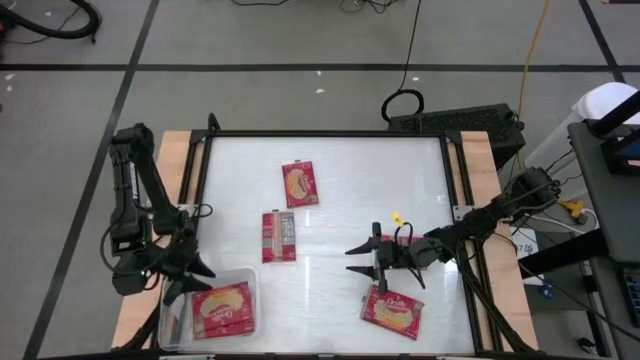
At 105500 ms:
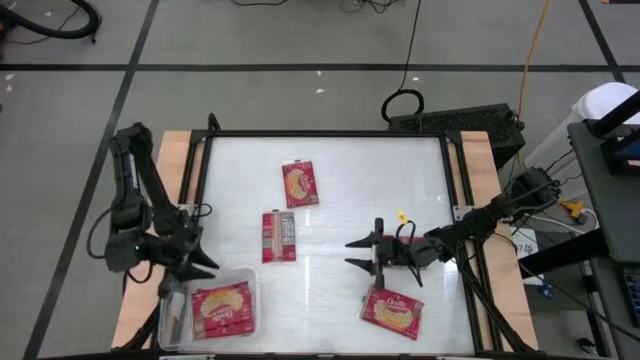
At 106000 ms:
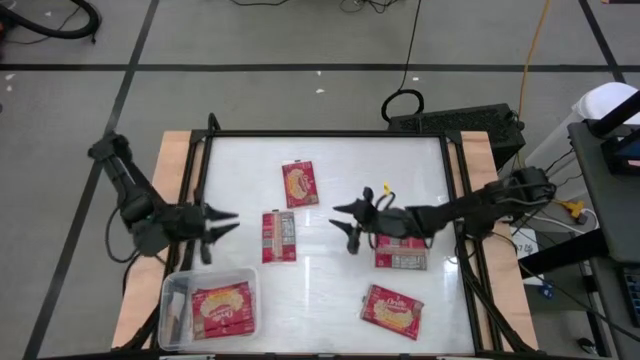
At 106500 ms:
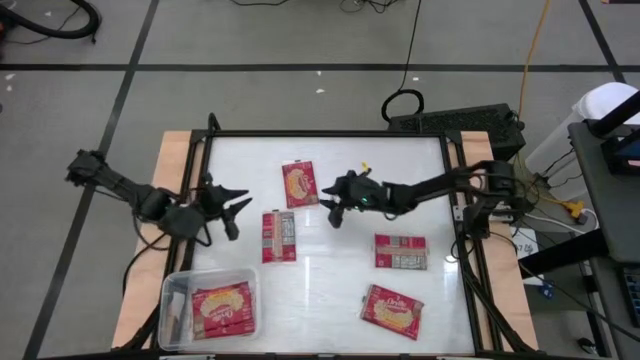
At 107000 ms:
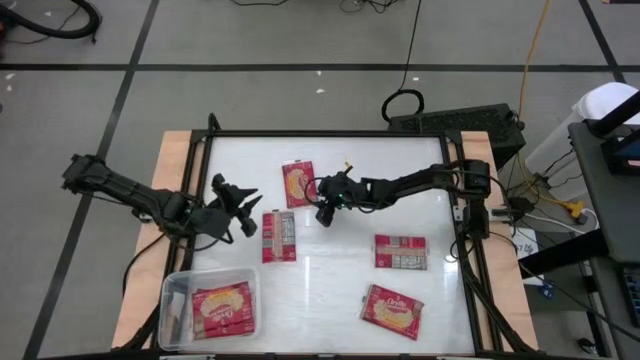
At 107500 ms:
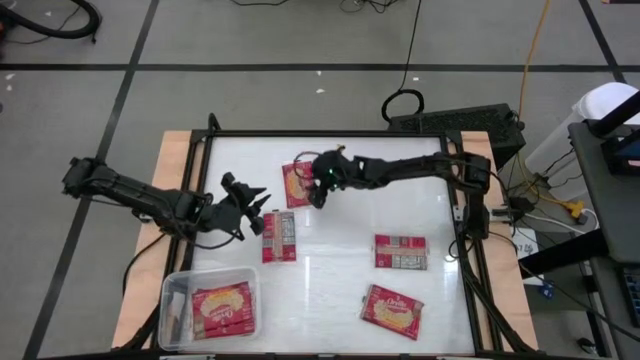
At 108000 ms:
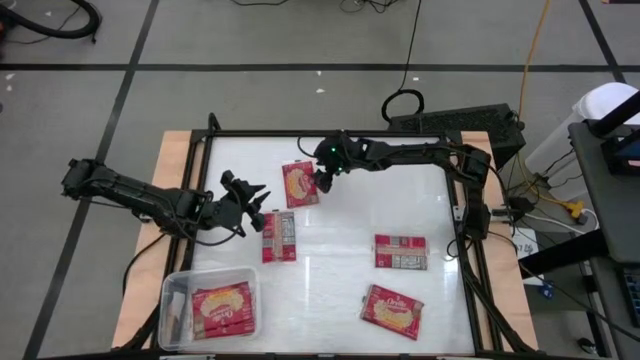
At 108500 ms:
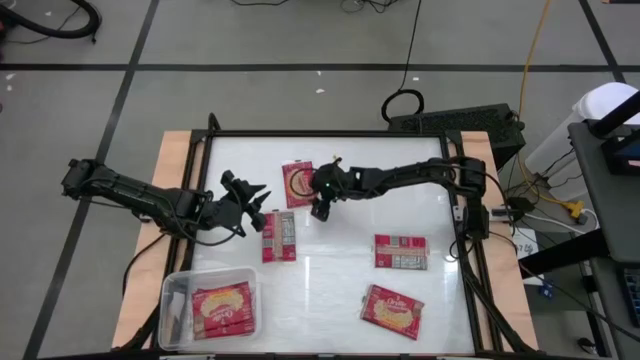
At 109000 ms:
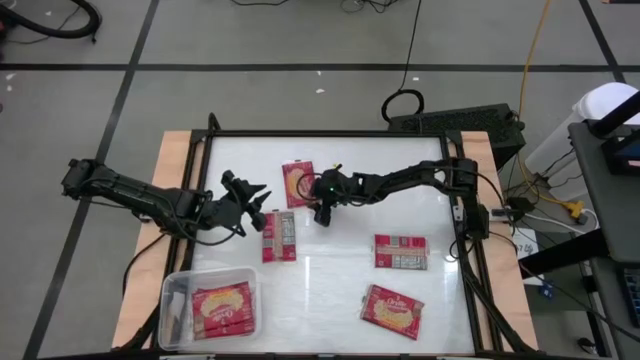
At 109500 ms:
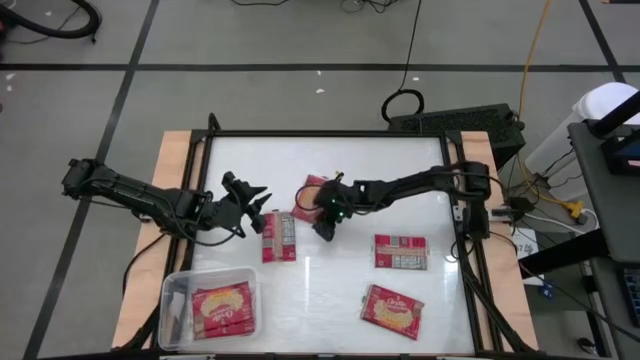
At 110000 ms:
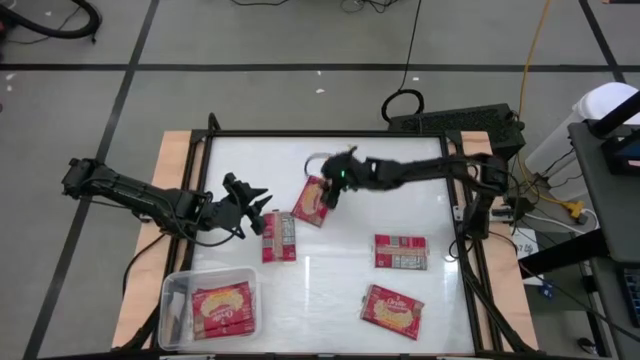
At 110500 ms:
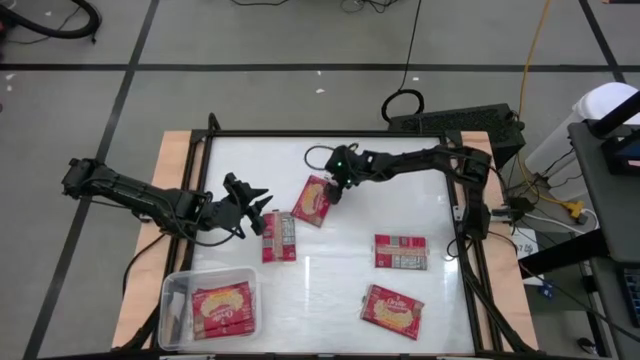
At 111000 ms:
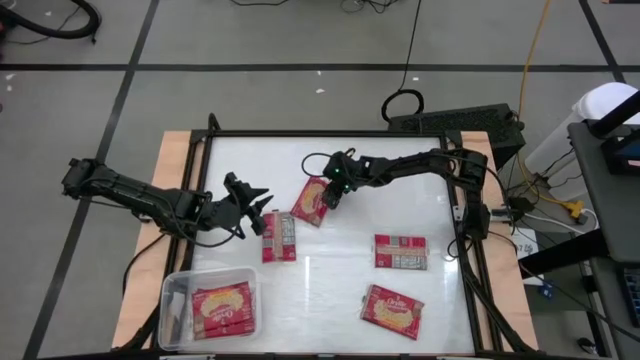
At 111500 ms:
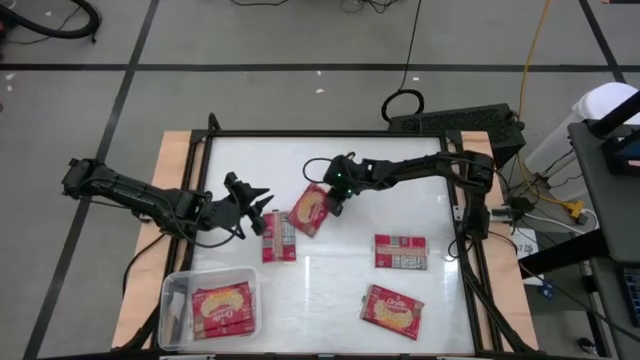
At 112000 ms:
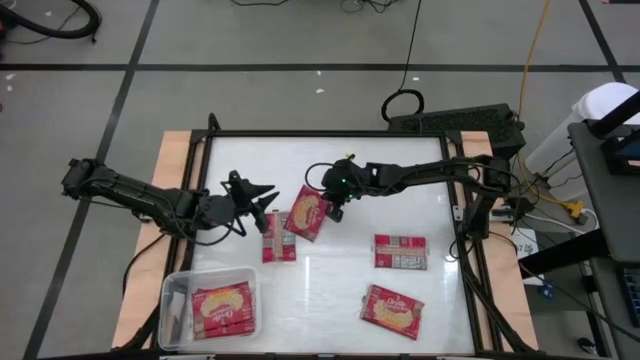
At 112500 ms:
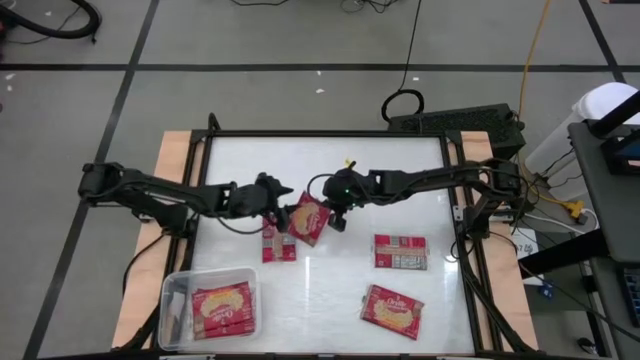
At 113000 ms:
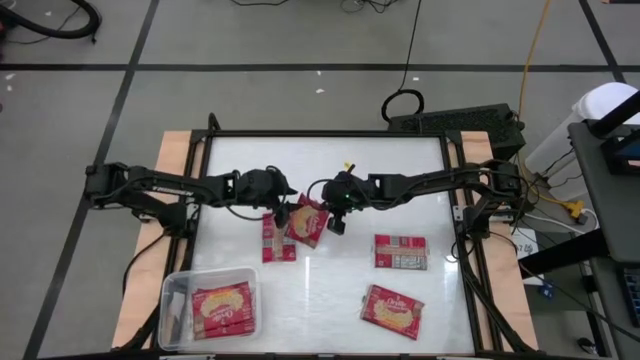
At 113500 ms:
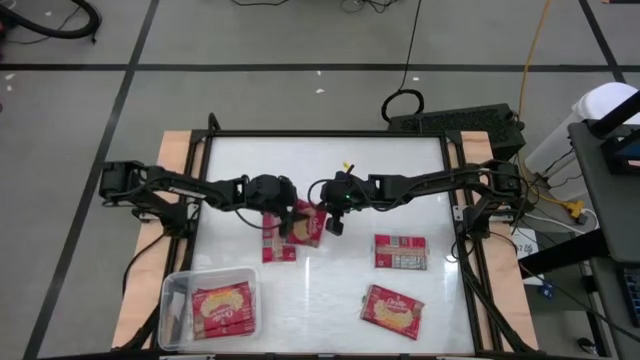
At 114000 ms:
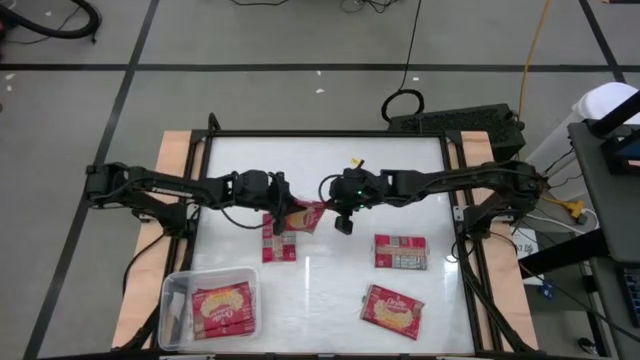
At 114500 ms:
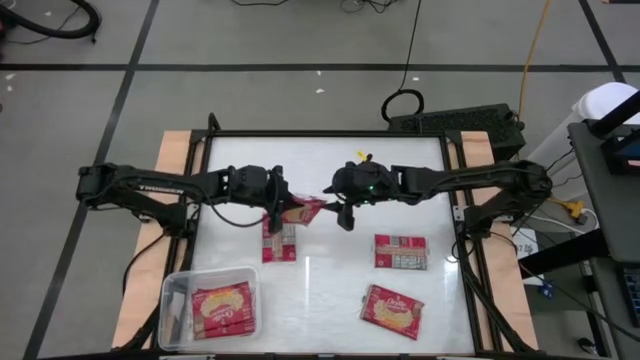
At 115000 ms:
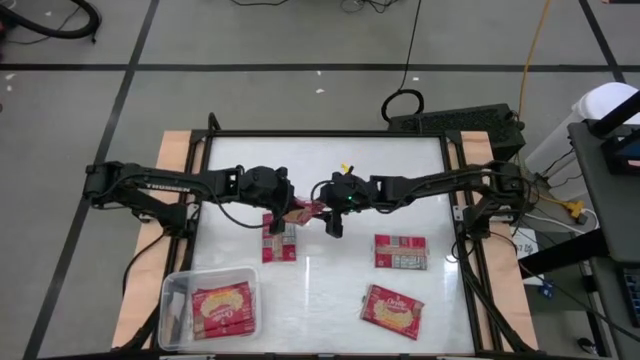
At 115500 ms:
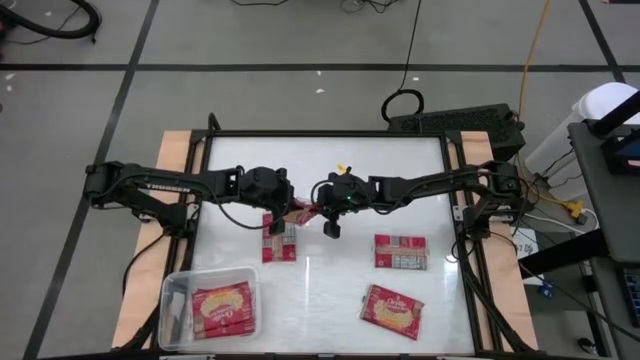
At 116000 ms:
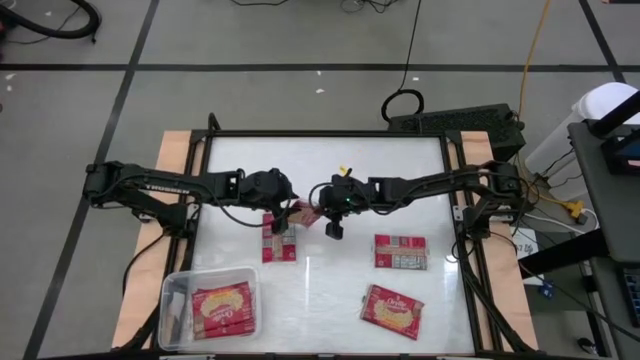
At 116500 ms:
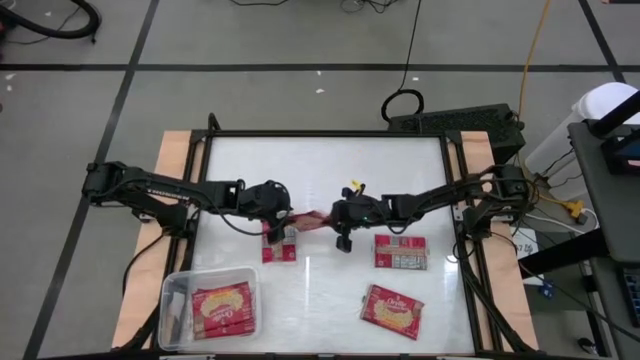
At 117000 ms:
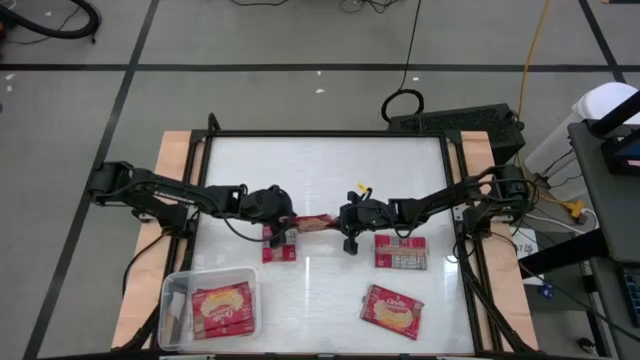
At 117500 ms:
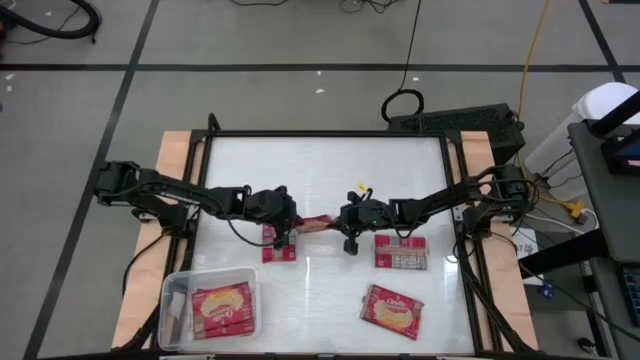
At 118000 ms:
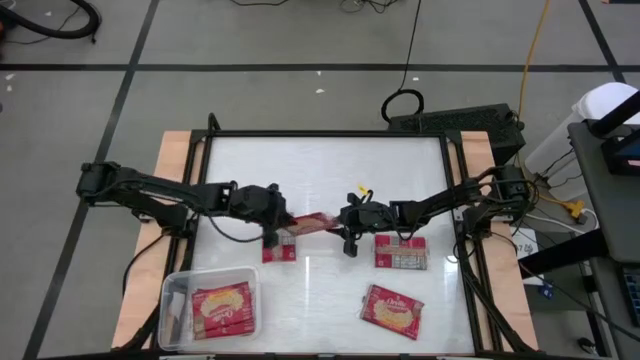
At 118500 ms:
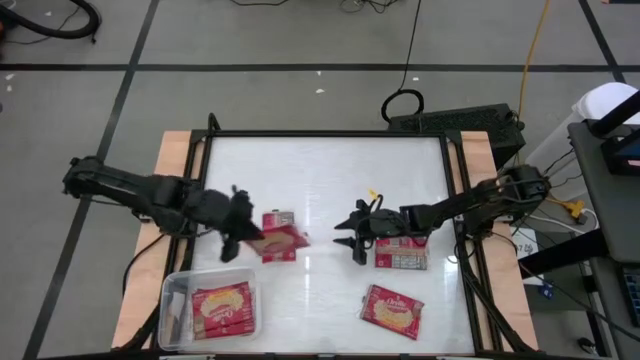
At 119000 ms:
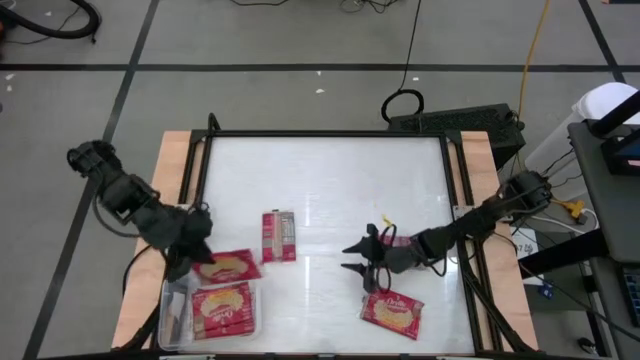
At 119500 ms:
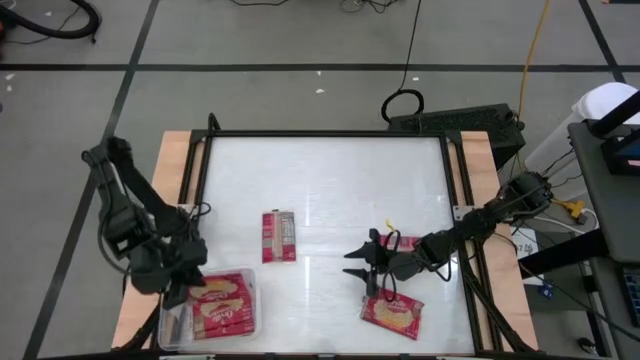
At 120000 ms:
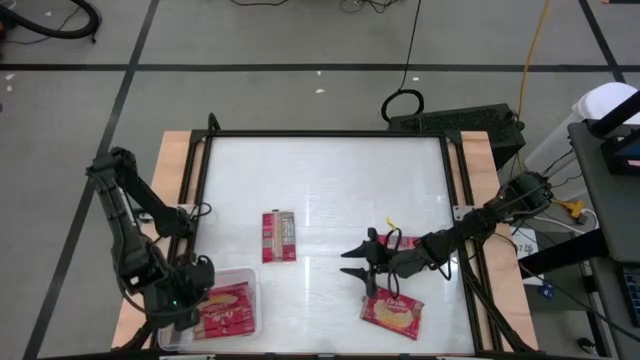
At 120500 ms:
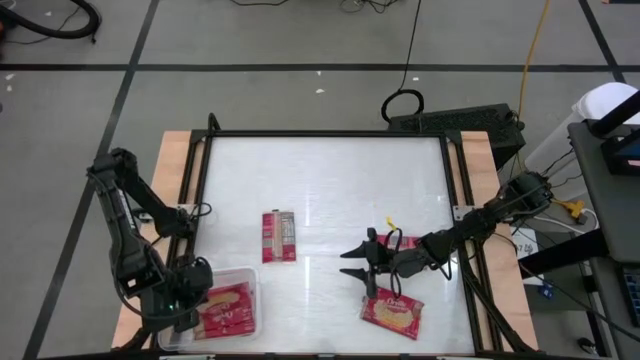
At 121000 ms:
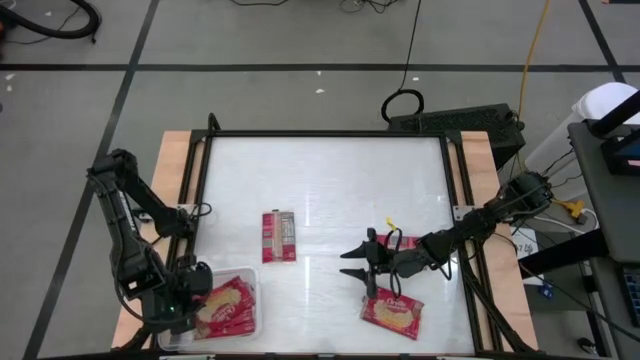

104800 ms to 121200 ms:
Task: Sort popcorn bags into baskets
Put the popcorn bag into the transparent bin

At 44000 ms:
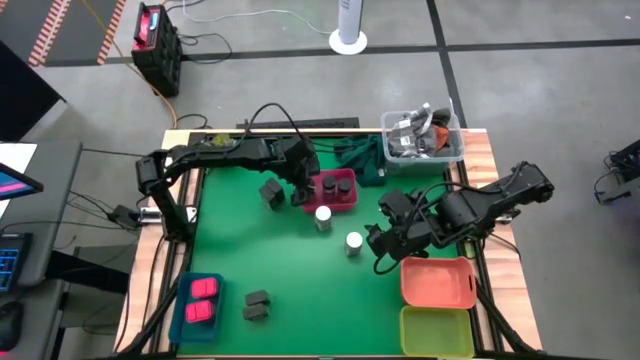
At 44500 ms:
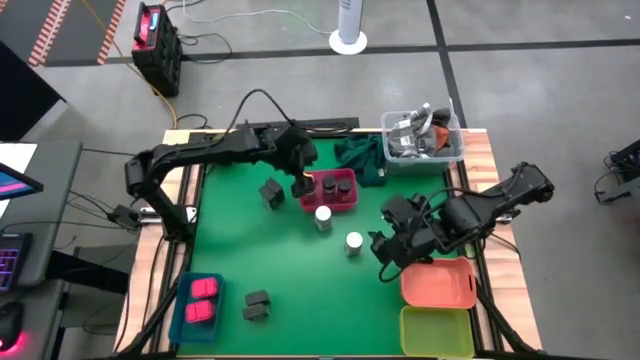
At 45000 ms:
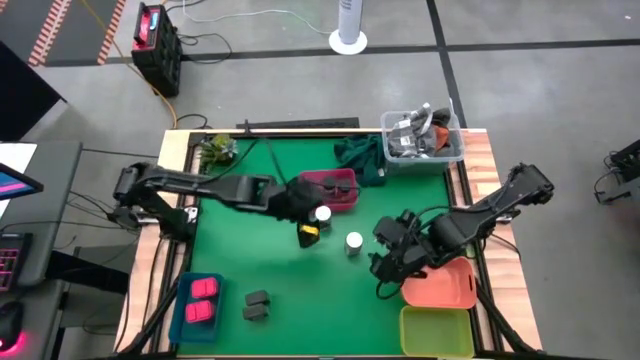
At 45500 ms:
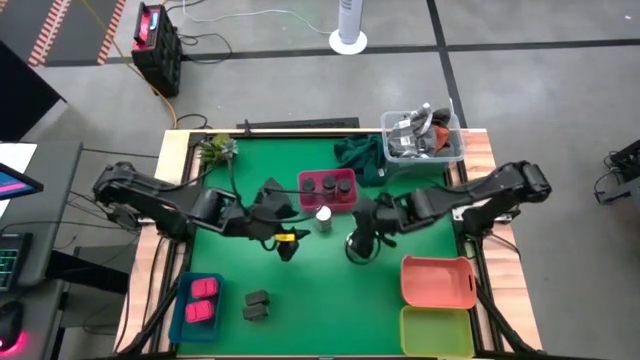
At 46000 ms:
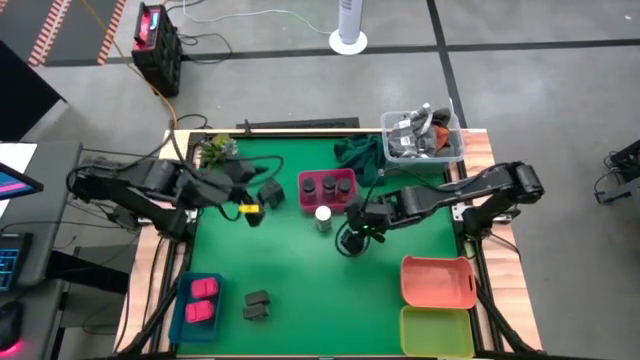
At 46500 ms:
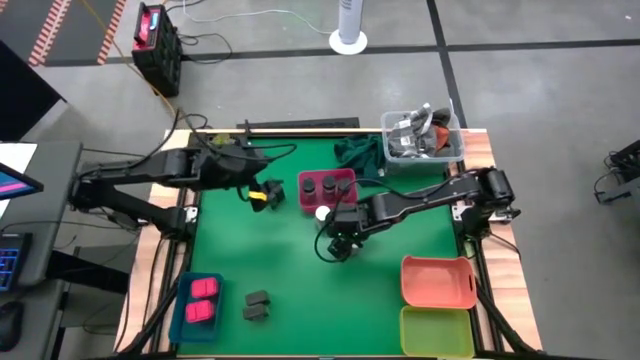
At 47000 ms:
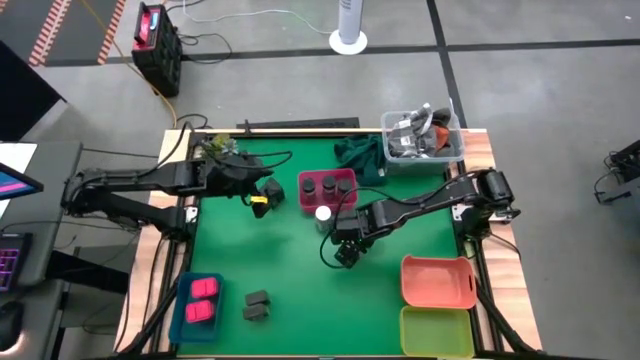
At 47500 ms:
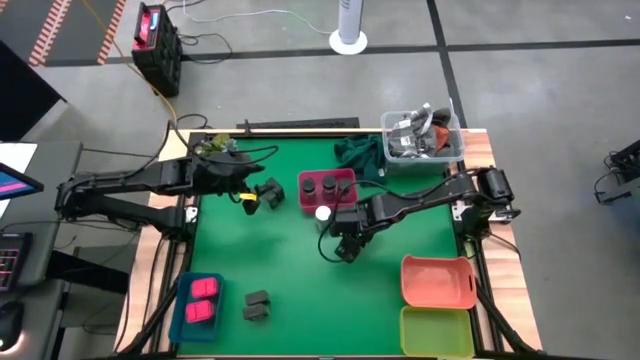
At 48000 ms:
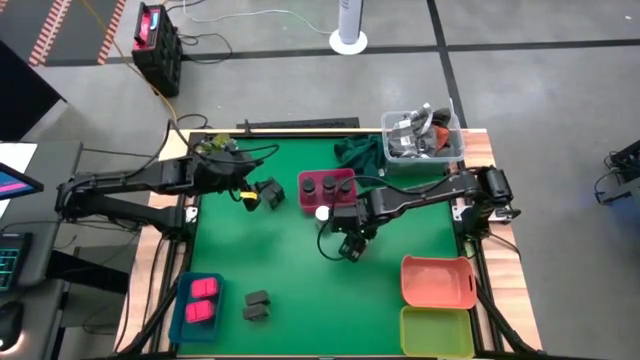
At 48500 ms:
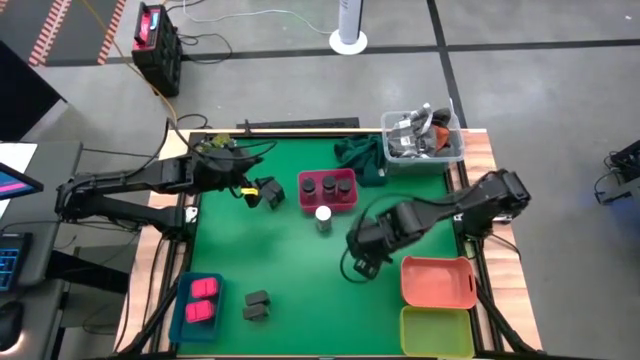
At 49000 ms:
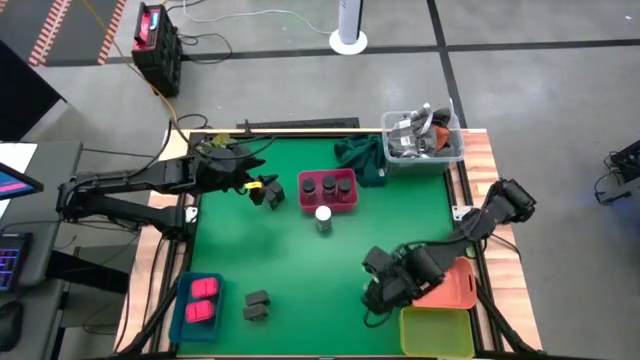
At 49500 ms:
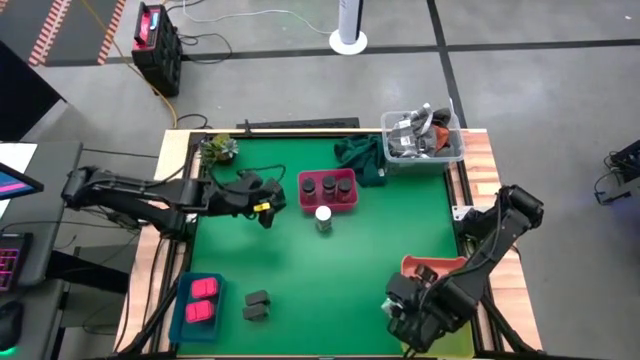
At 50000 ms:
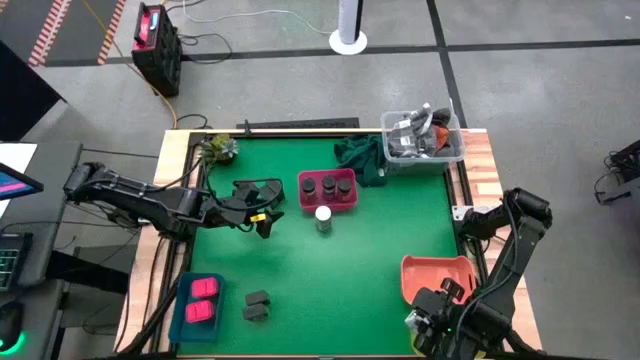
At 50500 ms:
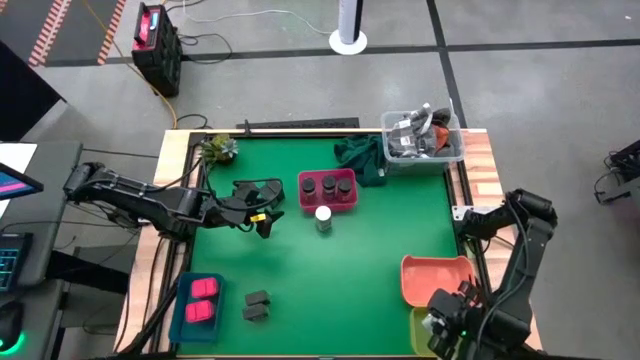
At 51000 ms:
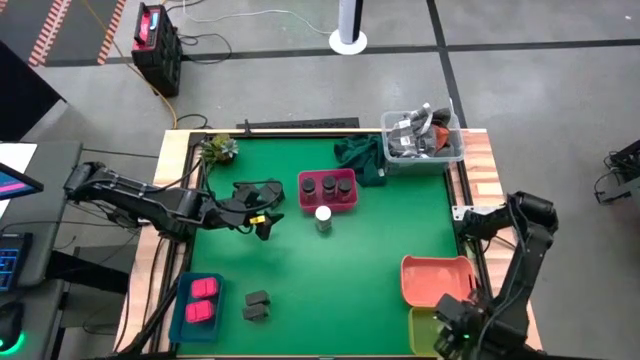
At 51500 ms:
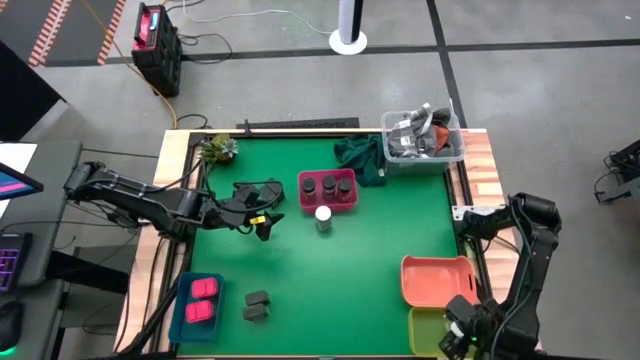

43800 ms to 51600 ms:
Task: Sort spices by type
Put the bottom white seasoning bottle into the yellow bin
